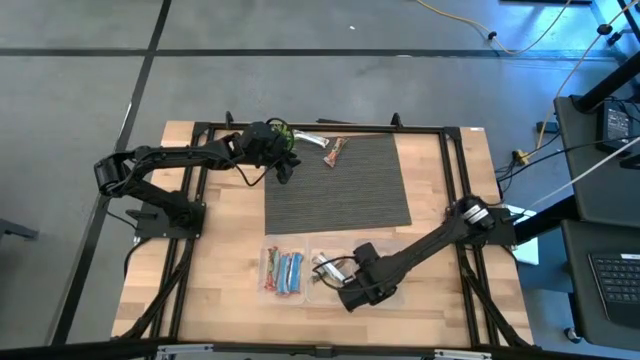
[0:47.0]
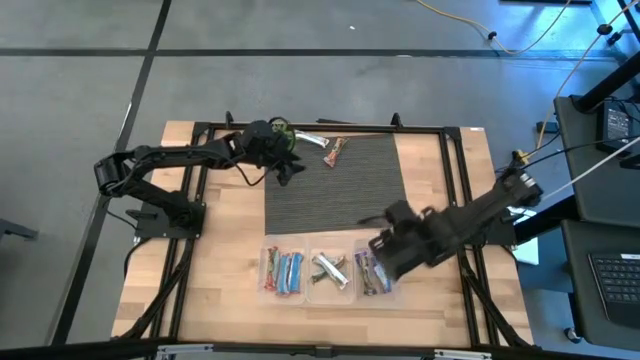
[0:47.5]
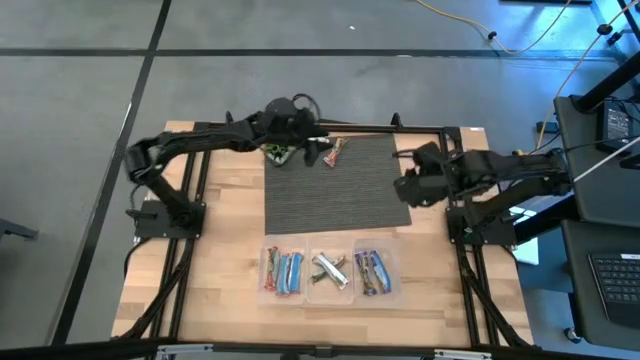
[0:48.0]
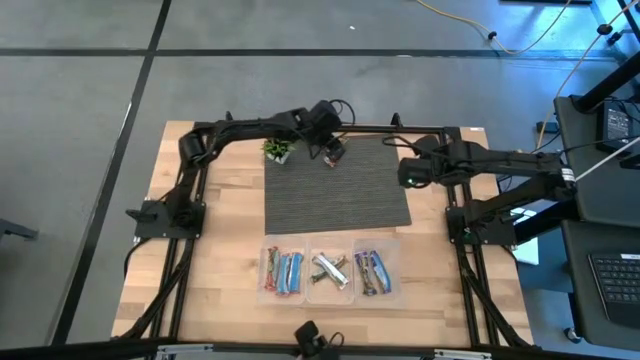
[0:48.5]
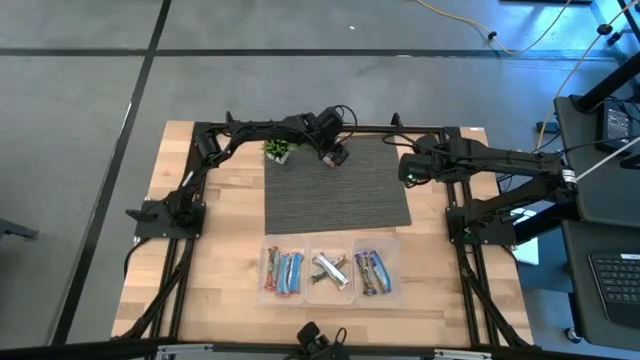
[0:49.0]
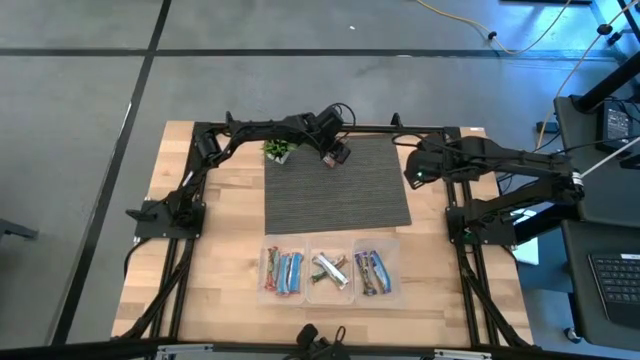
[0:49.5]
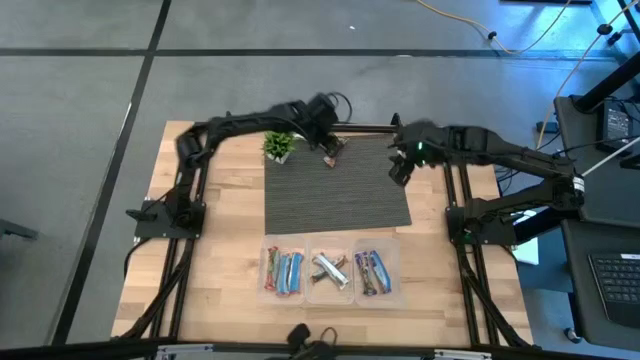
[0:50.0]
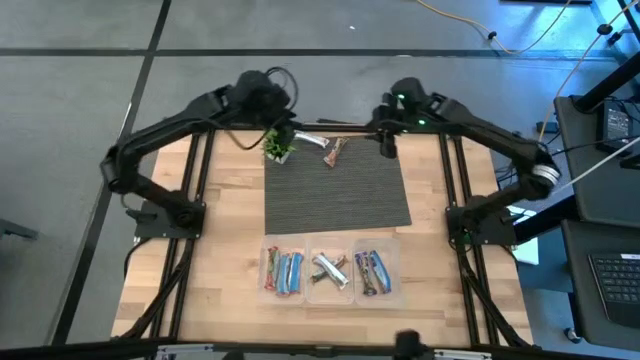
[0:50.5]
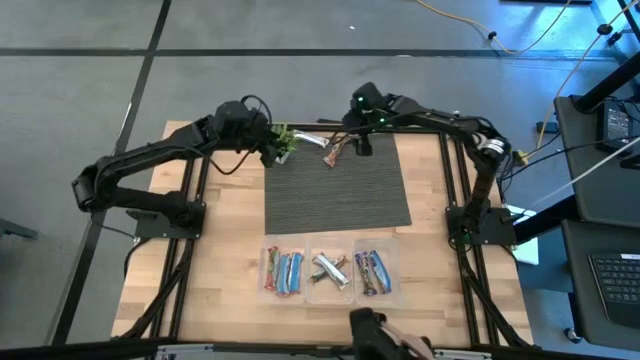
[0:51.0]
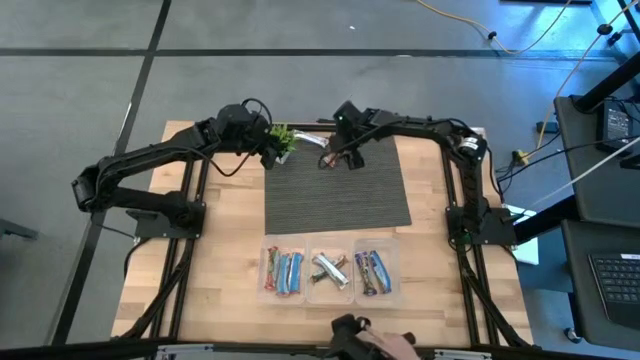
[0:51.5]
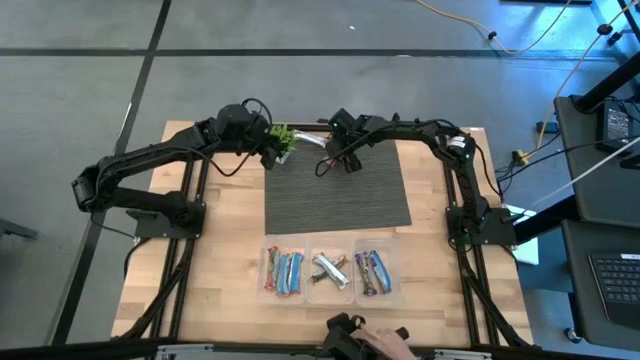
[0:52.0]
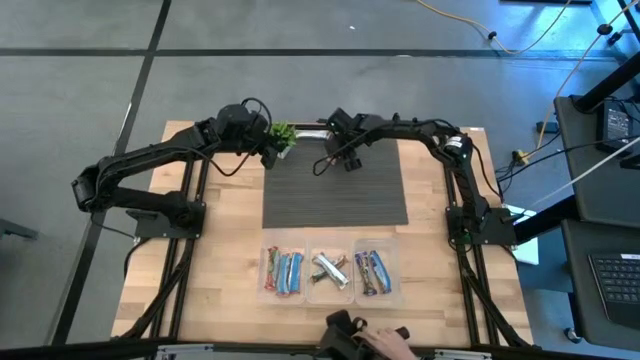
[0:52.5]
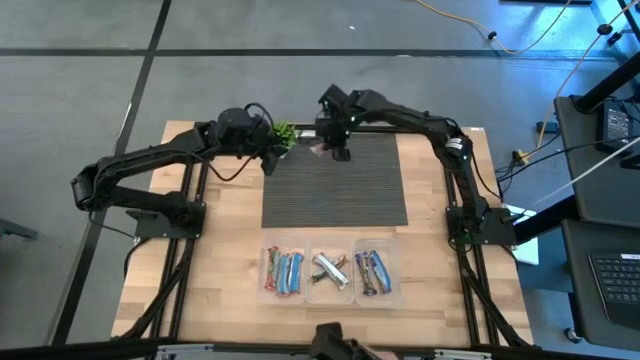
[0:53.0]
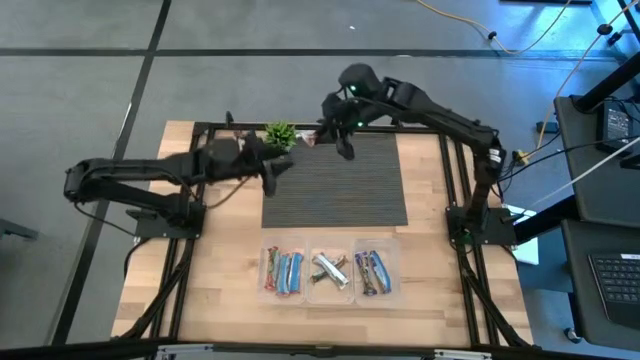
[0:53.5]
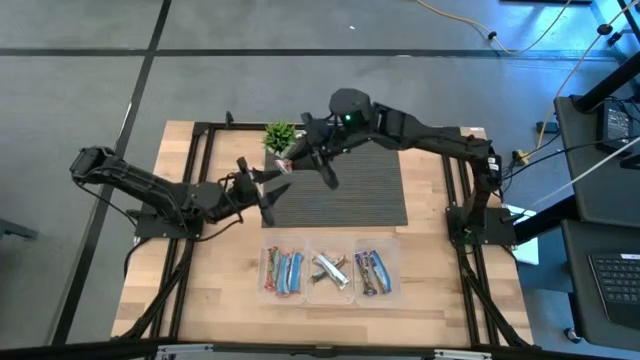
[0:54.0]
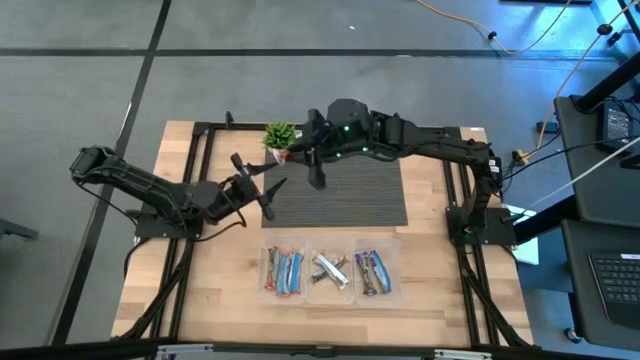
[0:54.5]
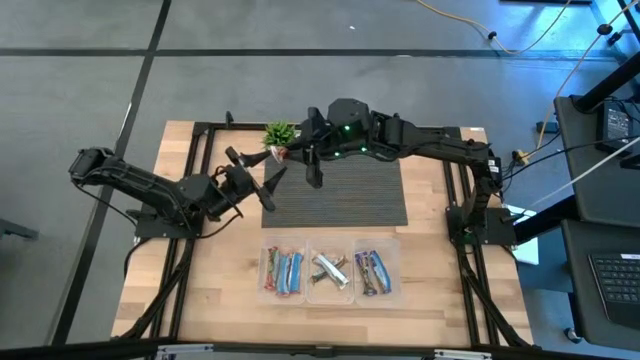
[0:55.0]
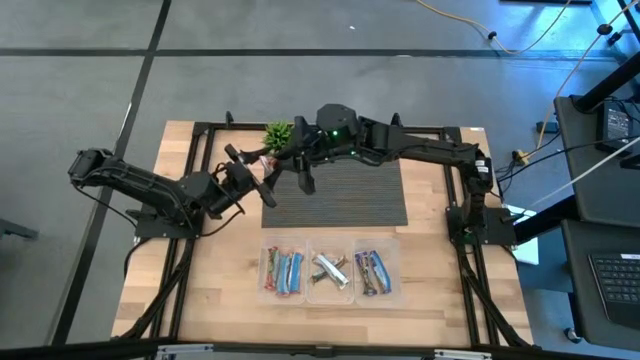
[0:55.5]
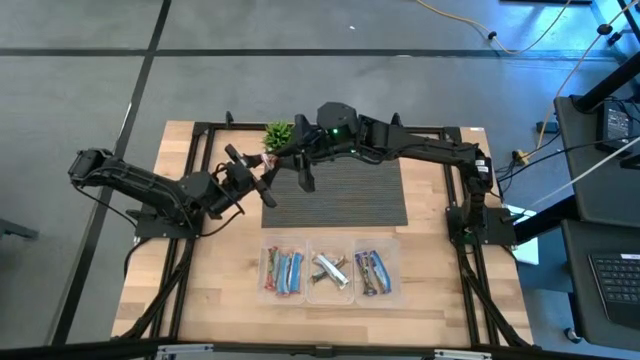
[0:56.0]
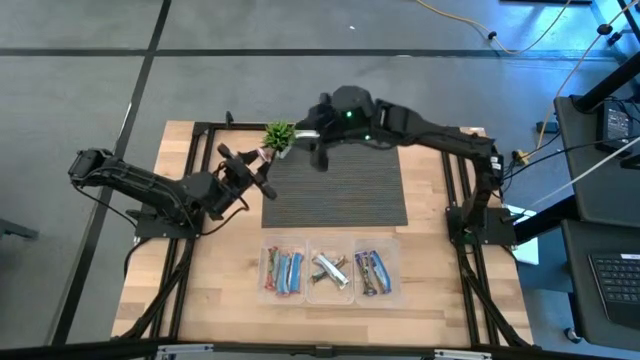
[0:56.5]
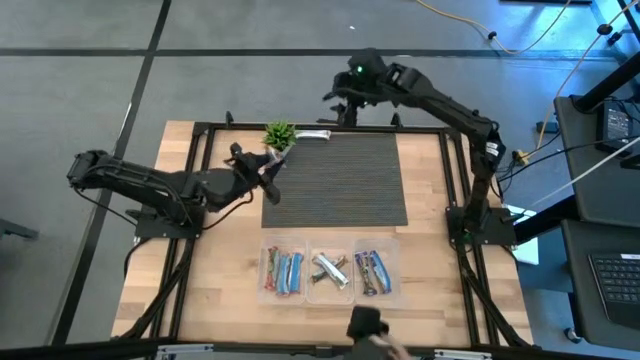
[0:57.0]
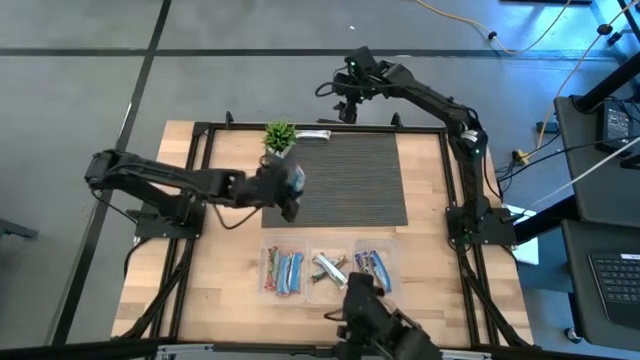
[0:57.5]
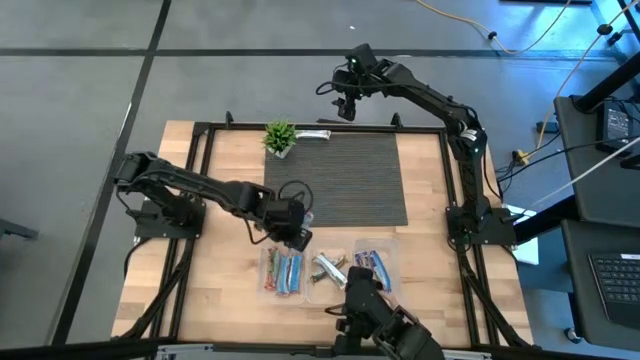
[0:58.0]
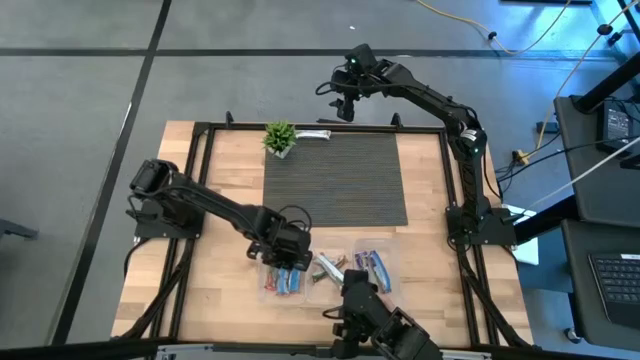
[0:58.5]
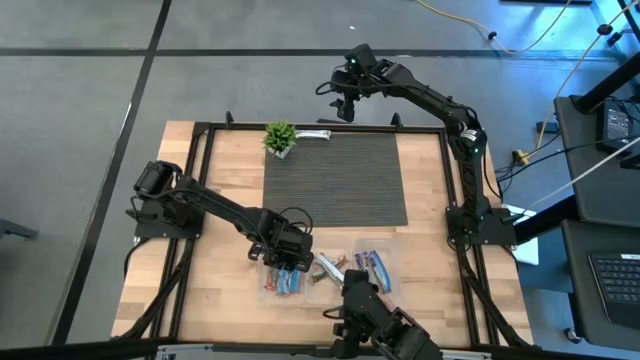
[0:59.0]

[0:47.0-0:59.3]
Task: Pick and place Granola Bars by type
Put the red granola bar into the left transparent bin

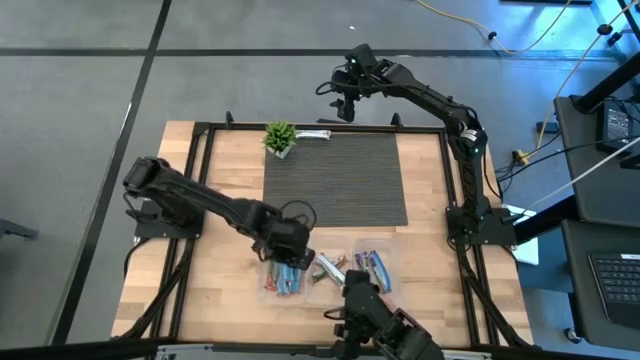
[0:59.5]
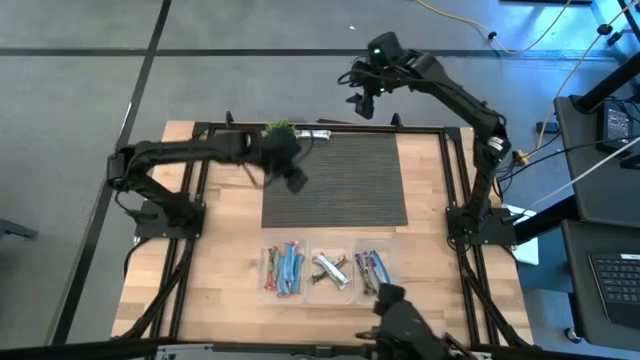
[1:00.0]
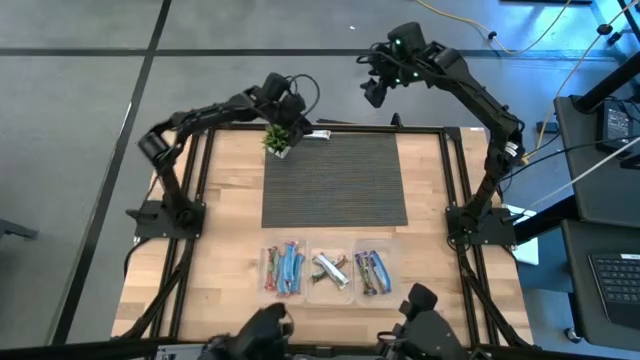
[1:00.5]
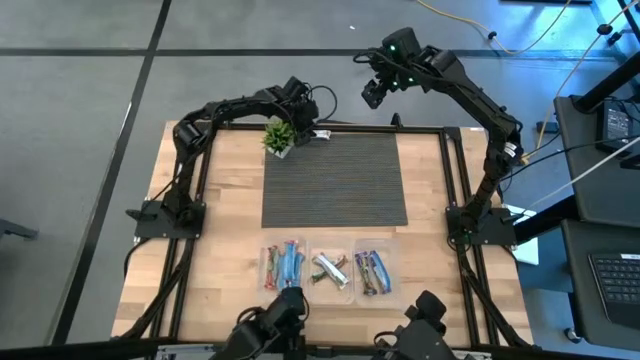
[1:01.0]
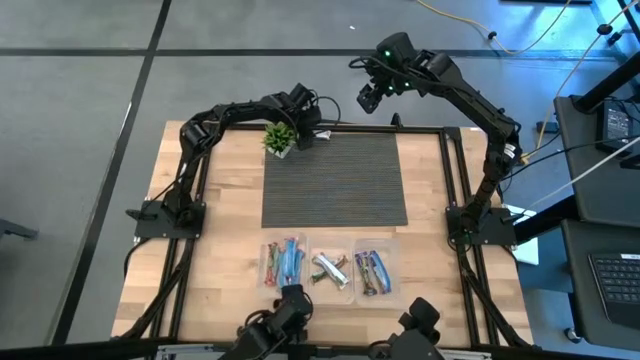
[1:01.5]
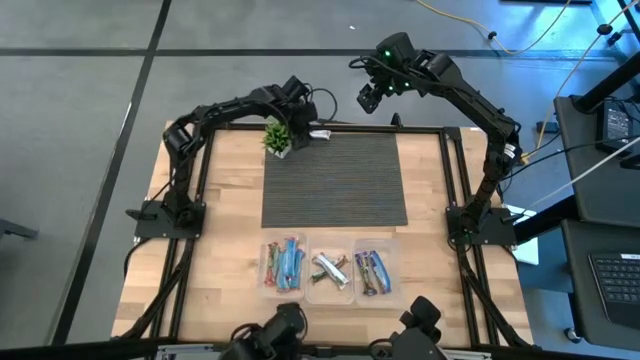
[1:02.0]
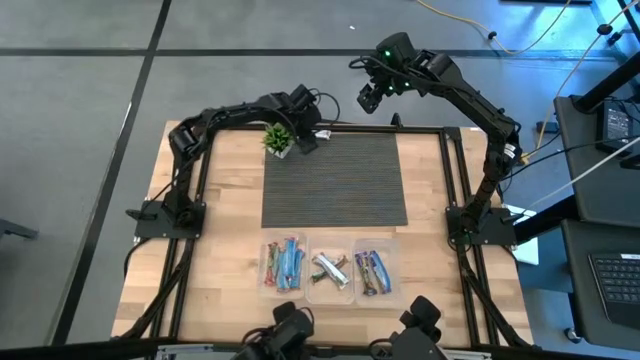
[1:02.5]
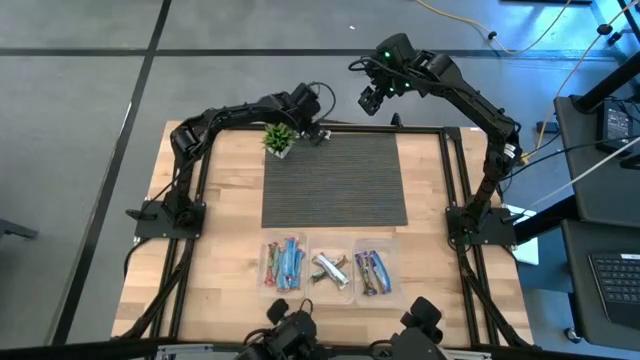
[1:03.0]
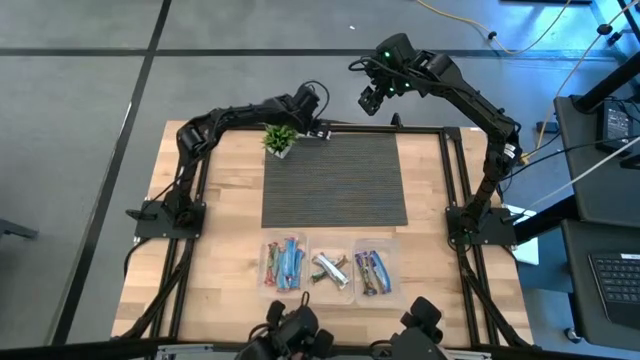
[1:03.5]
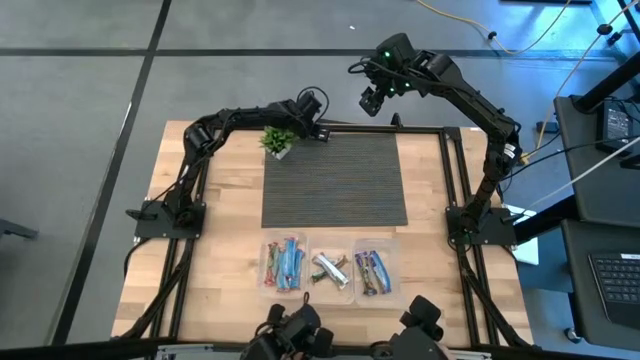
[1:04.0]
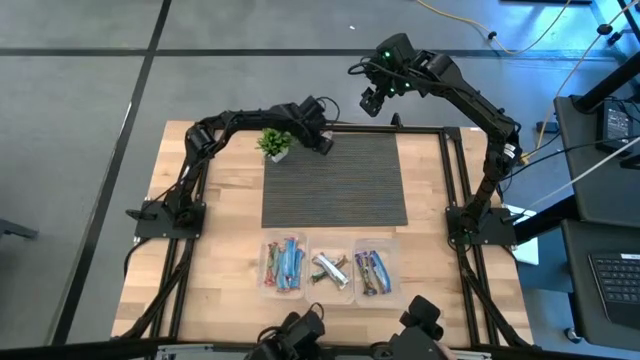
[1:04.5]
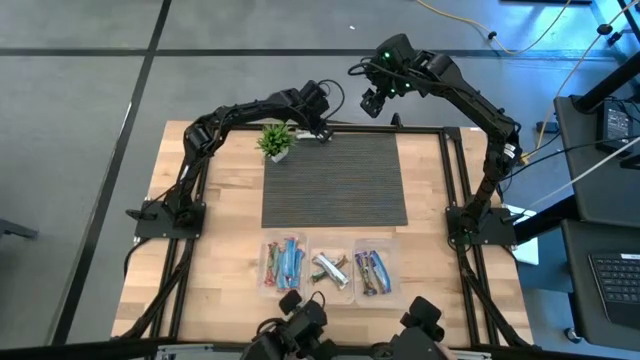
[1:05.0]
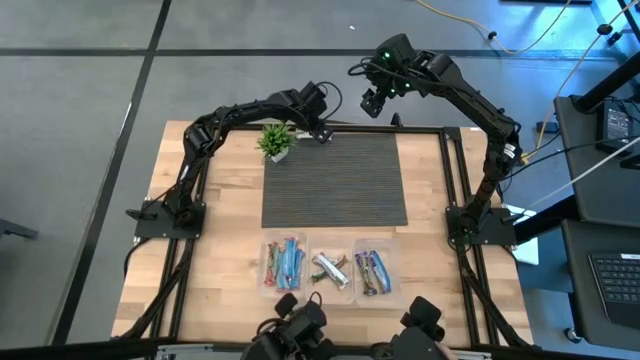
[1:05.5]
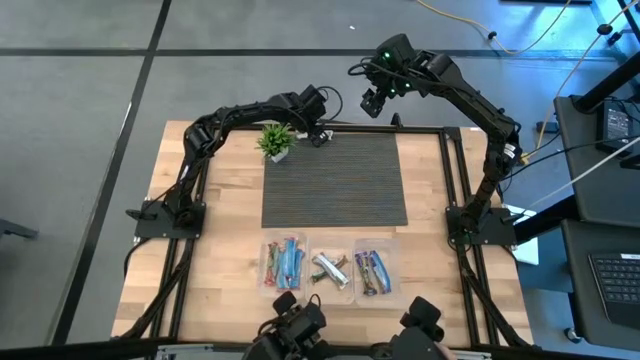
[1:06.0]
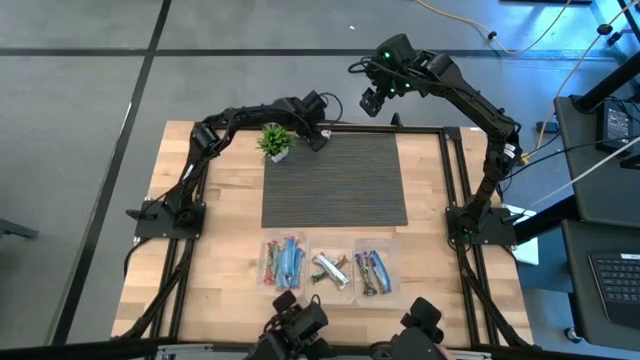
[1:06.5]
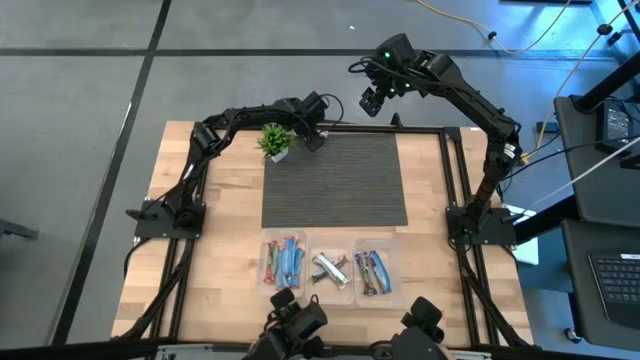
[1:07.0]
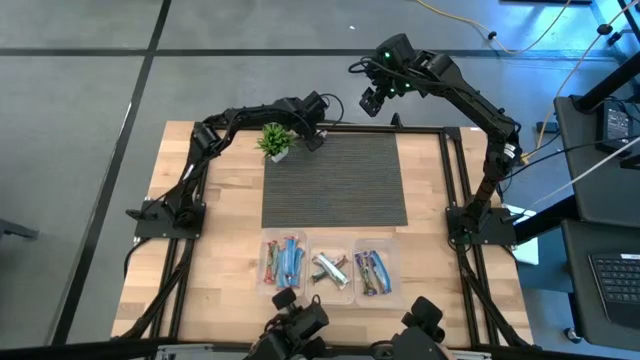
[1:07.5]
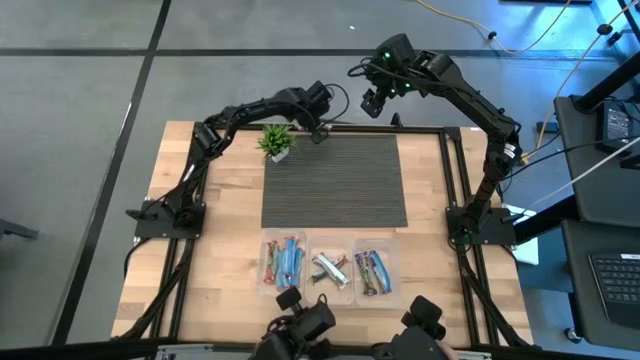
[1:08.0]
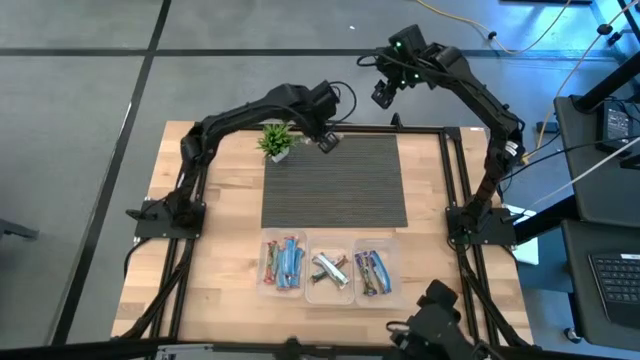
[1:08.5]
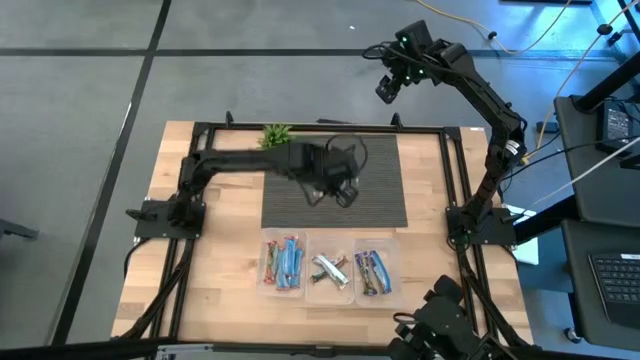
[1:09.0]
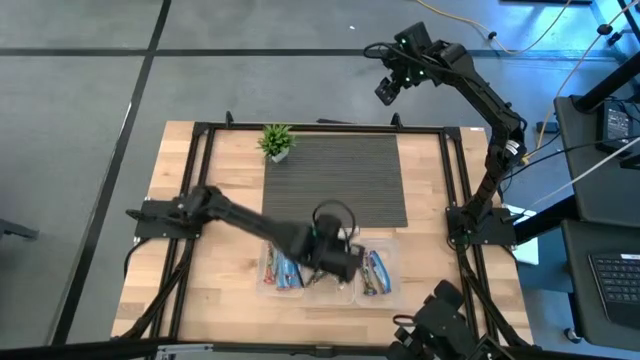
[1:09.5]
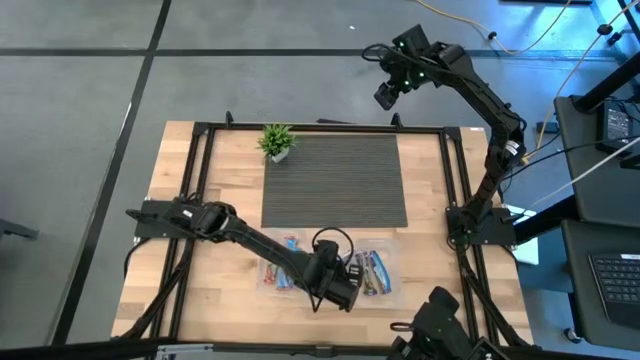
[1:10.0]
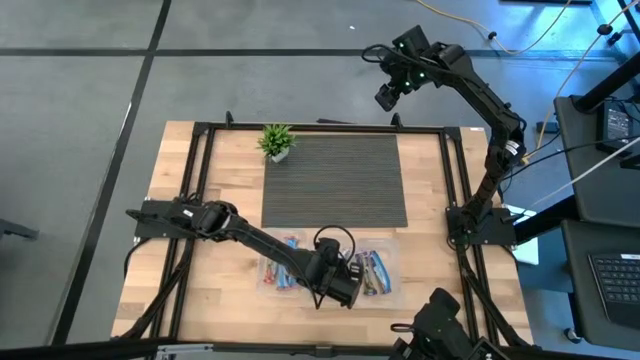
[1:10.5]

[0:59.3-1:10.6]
Put the yellow granola bar into the middle transparent bin
